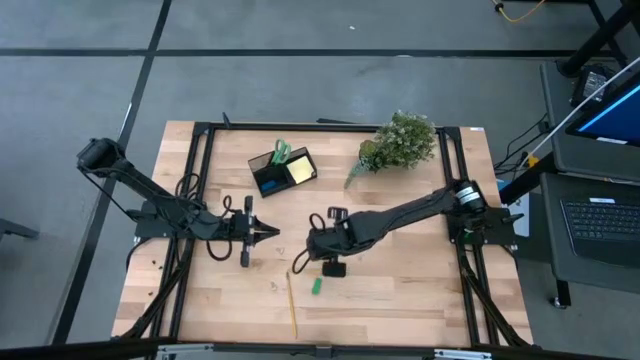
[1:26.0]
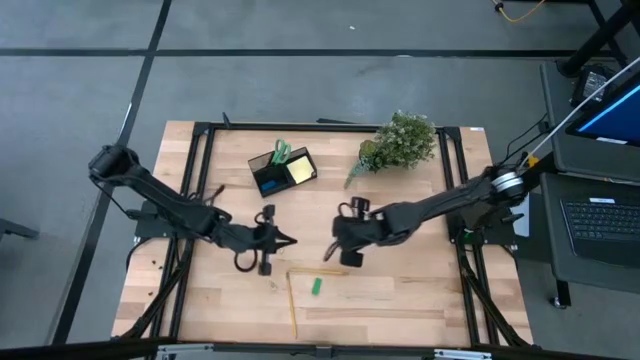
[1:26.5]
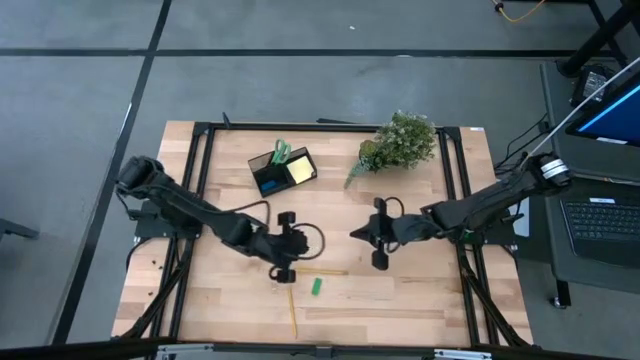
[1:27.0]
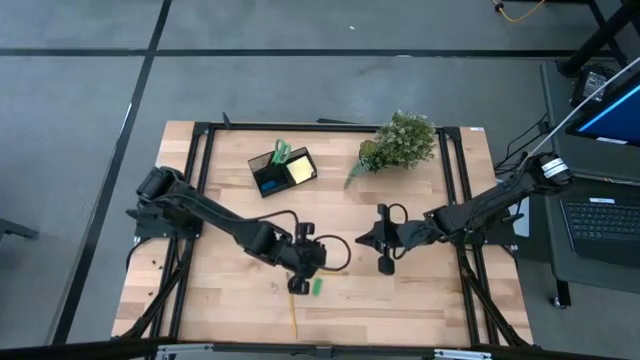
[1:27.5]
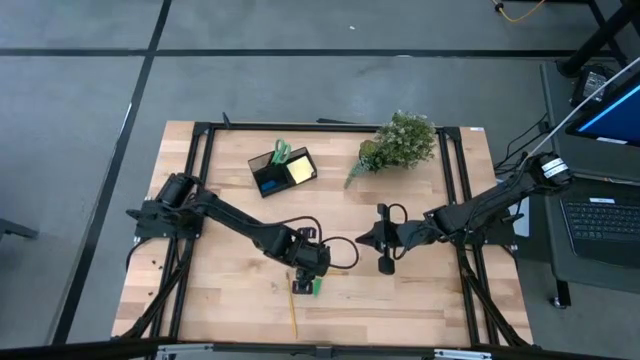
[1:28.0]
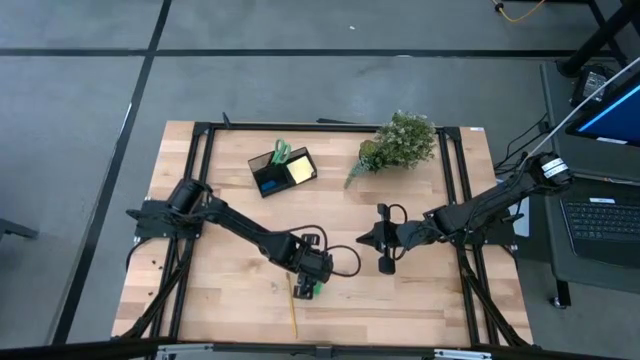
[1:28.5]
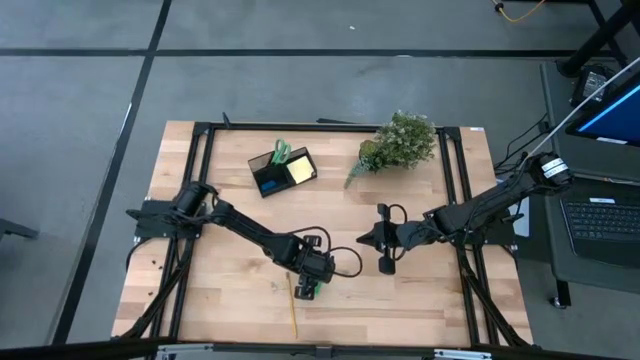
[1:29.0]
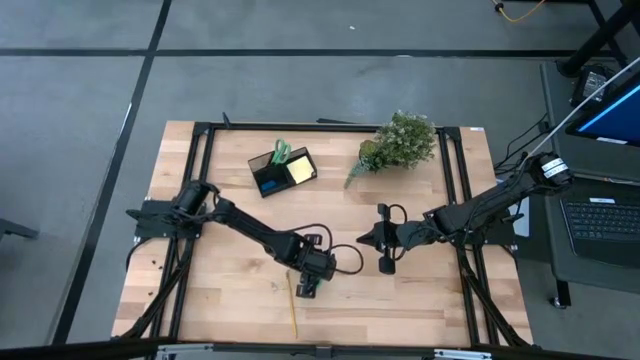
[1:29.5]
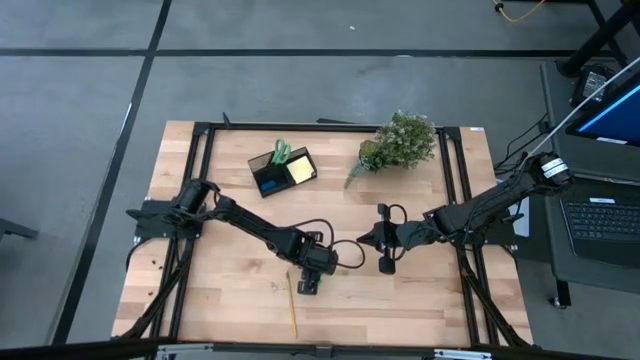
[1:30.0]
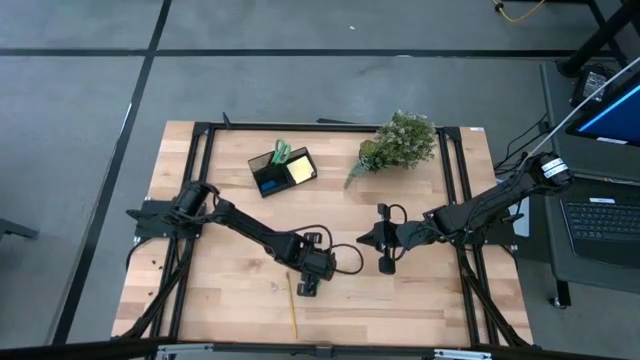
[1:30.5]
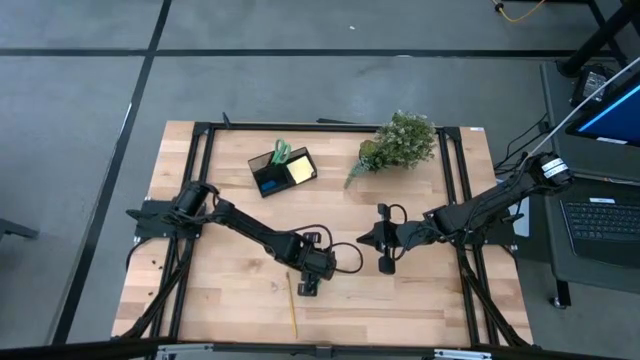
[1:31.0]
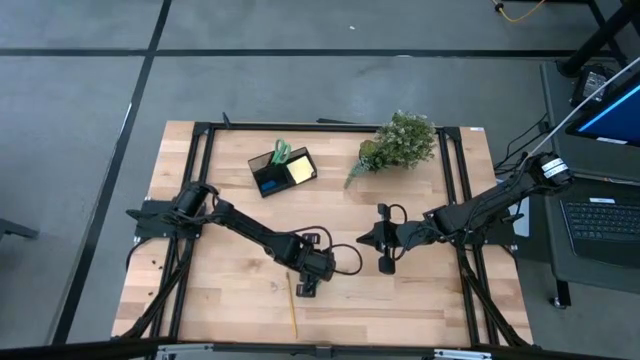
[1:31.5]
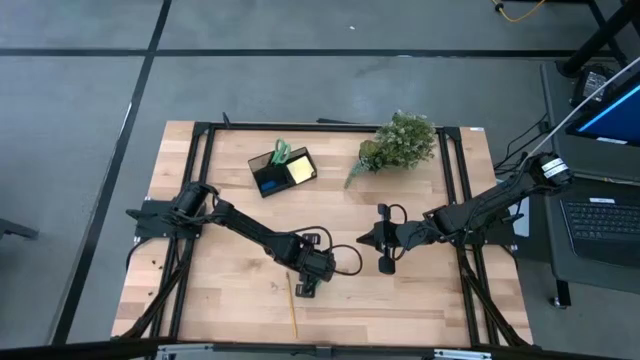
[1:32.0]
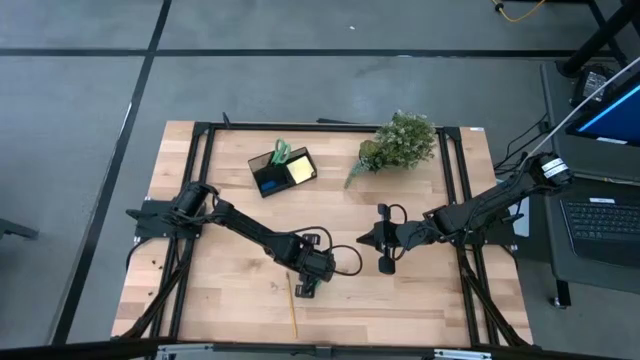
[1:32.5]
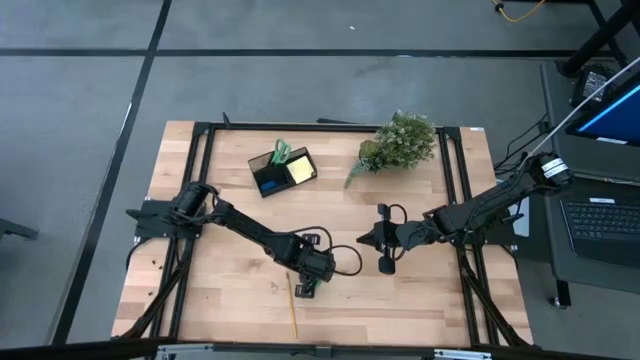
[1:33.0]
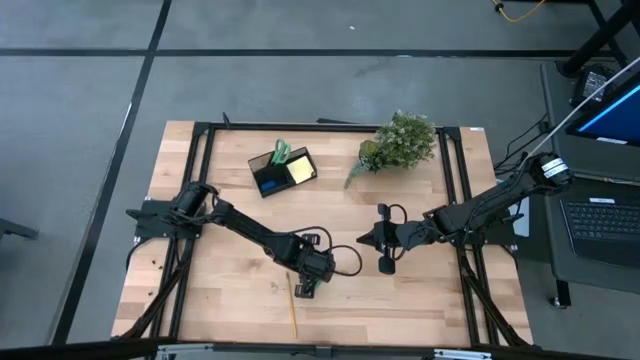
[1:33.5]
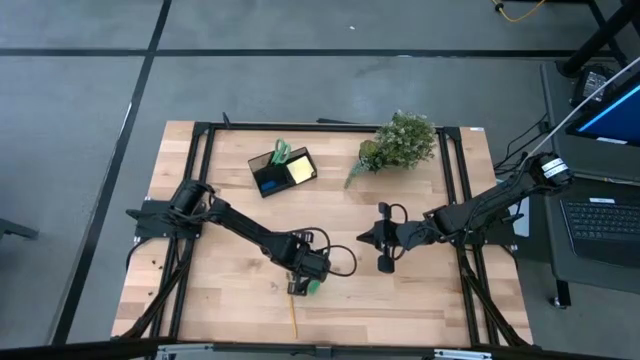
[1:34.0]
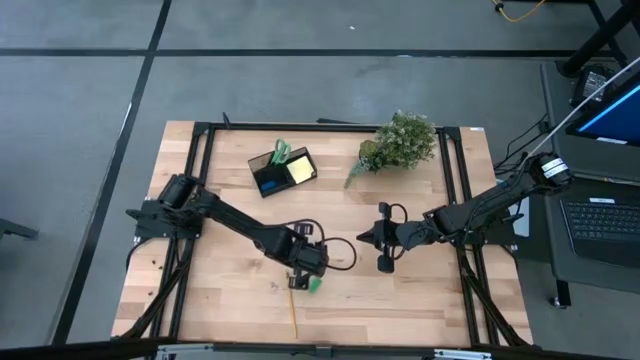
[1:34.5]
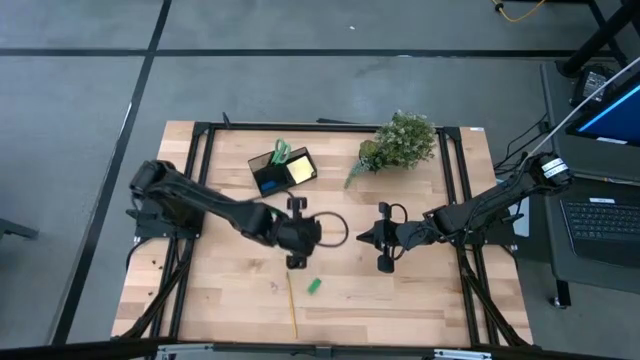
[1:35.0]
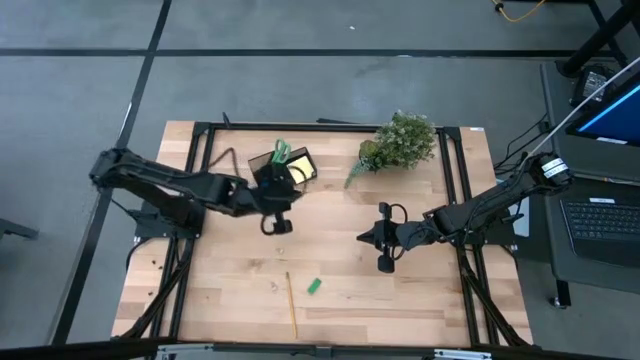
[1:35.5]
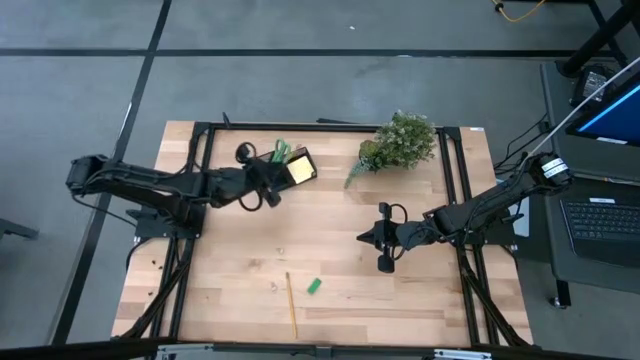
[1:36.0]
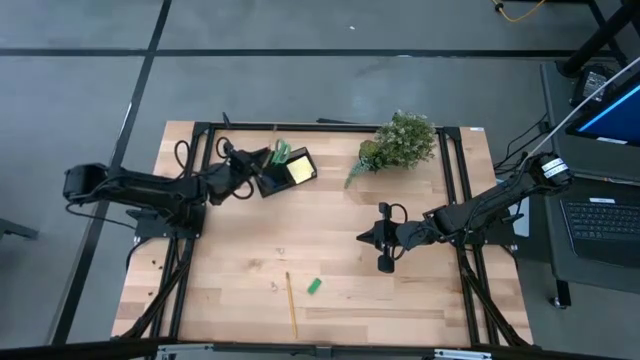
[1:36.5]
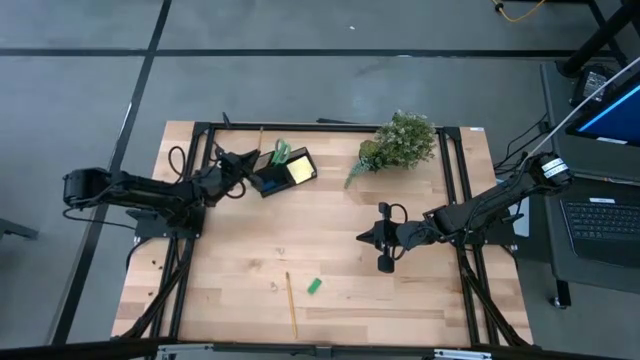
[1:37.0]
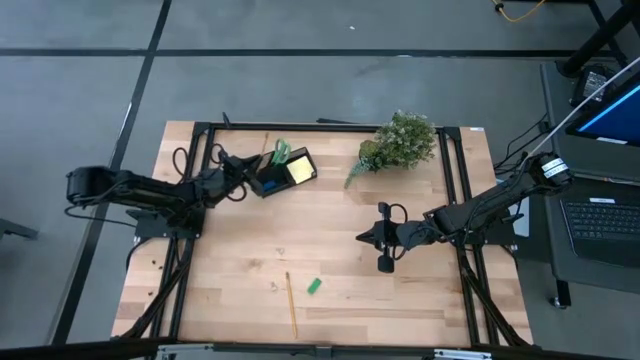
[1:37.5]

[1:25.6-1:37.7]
Task: Pick and place office supplies into organizer
Put the top yellow pencil into the desk organizer

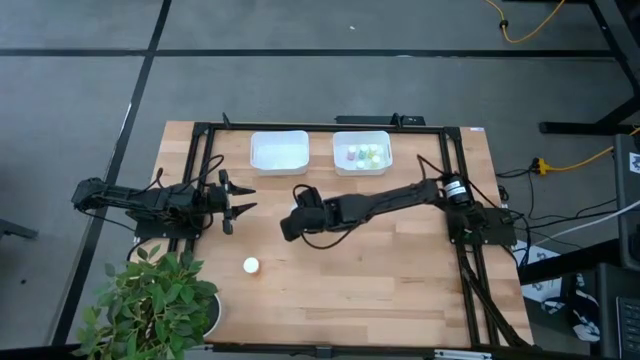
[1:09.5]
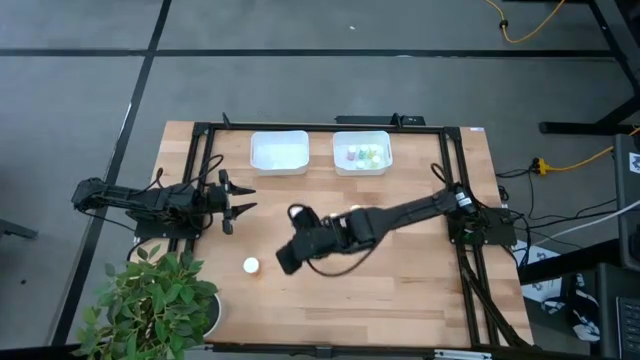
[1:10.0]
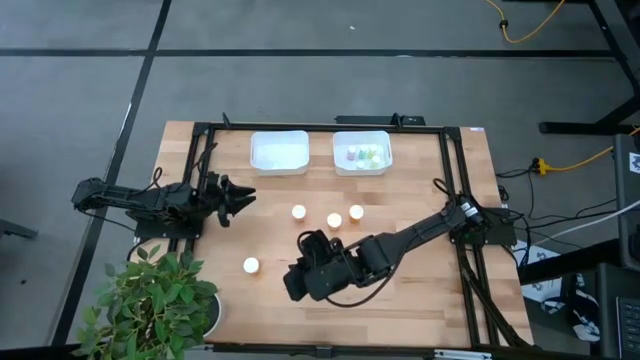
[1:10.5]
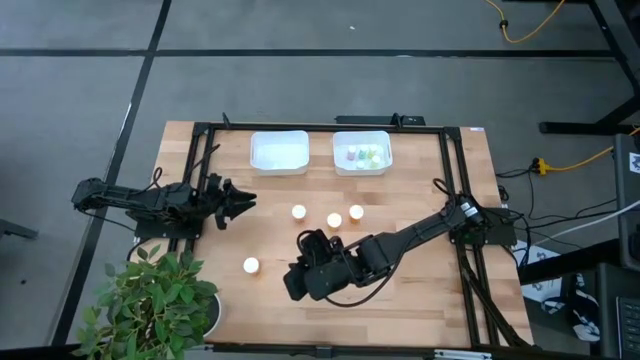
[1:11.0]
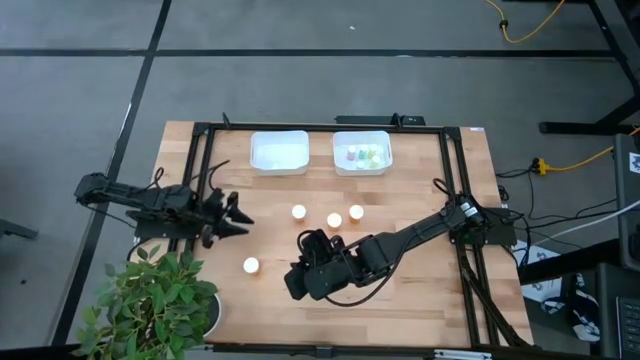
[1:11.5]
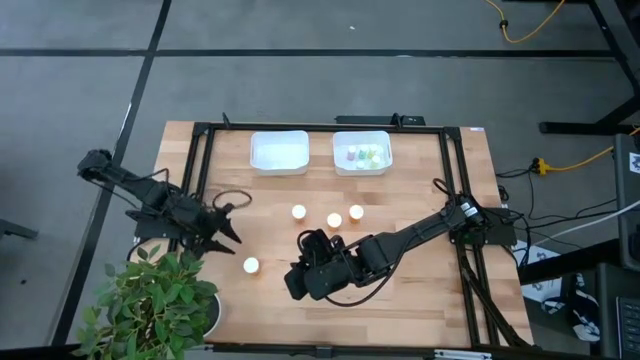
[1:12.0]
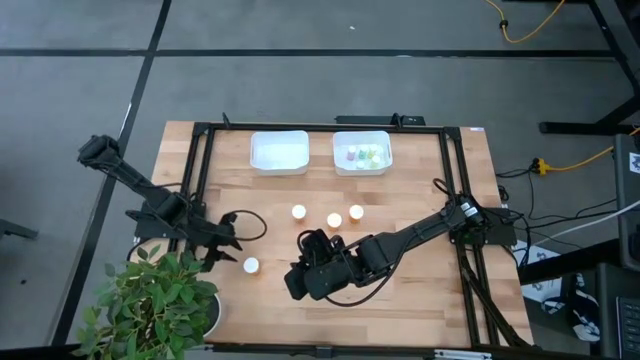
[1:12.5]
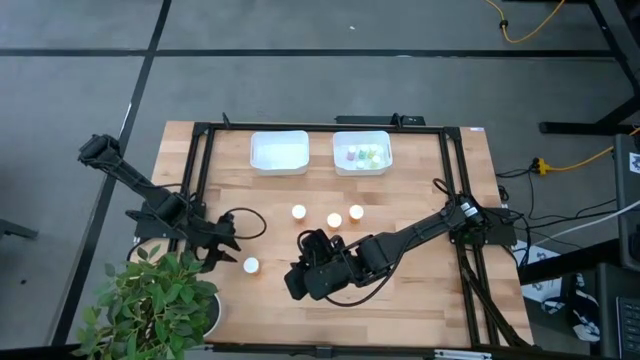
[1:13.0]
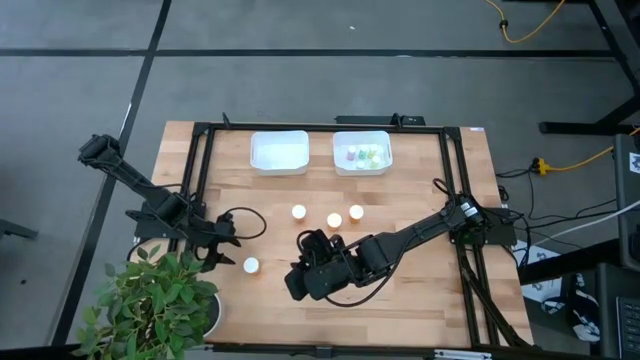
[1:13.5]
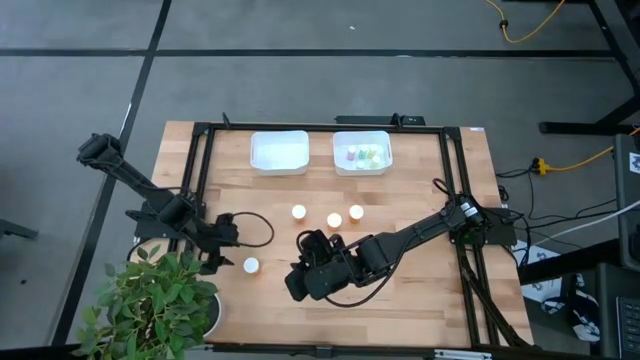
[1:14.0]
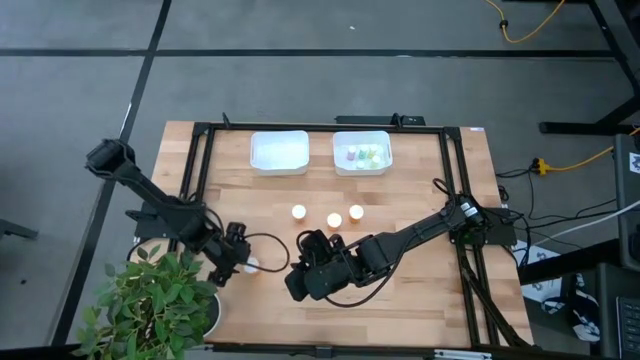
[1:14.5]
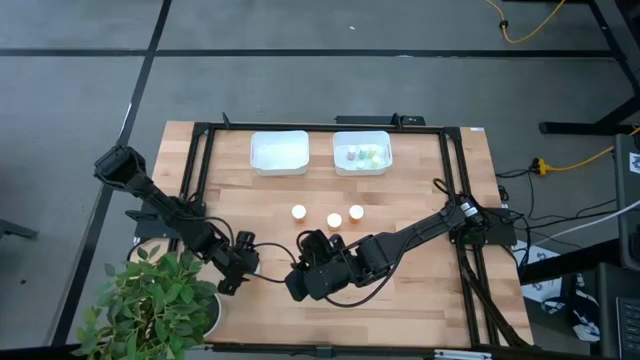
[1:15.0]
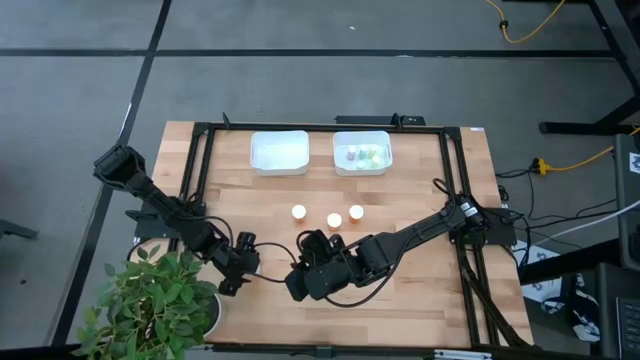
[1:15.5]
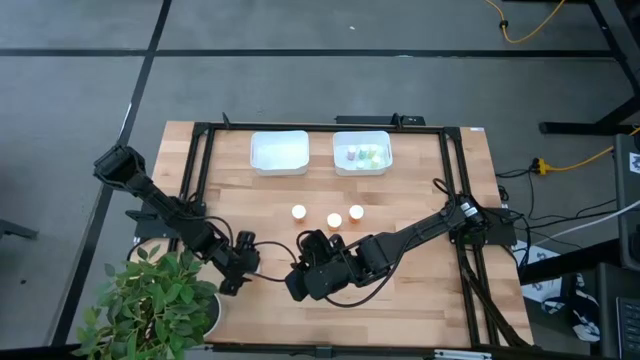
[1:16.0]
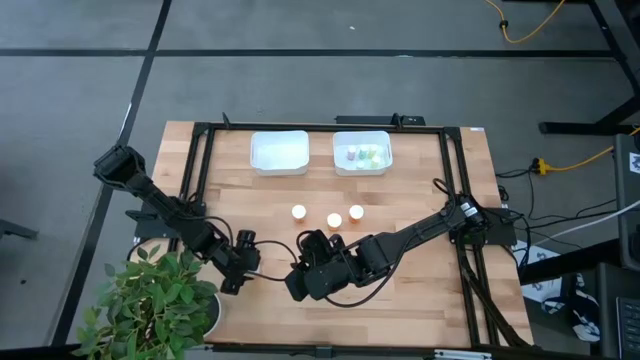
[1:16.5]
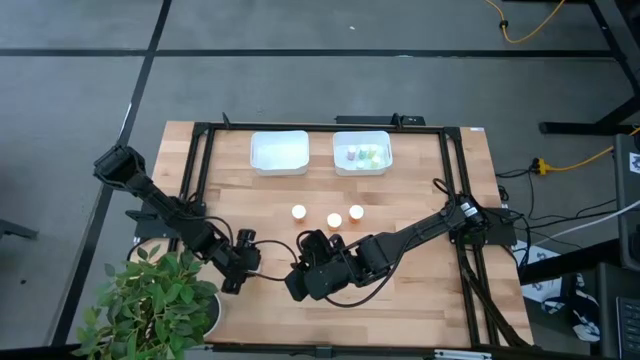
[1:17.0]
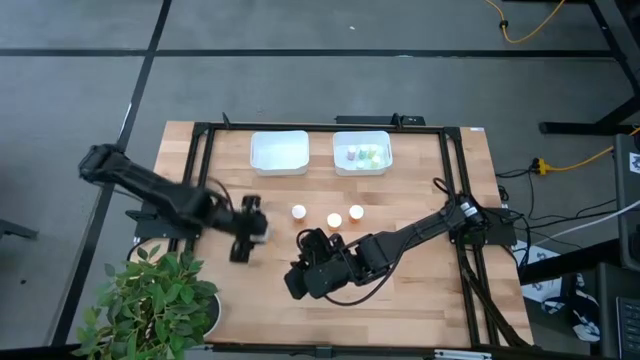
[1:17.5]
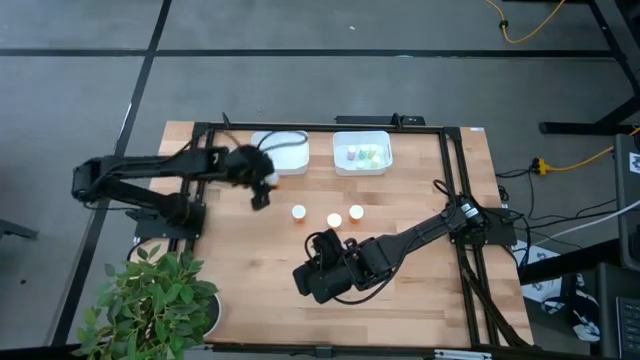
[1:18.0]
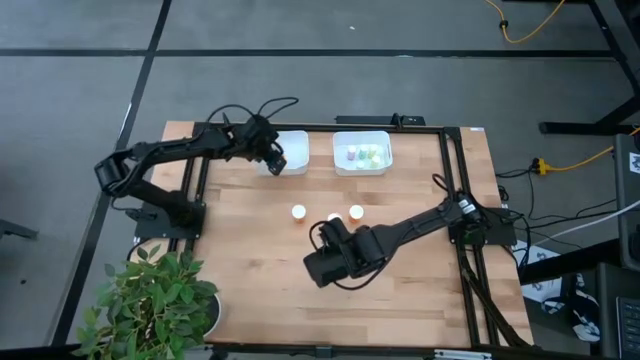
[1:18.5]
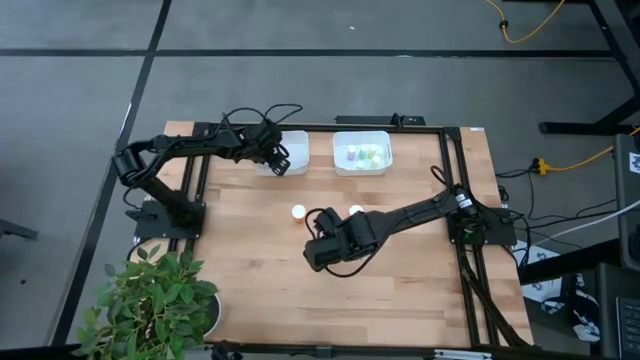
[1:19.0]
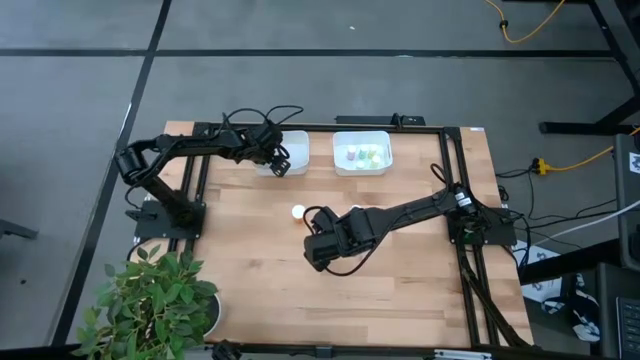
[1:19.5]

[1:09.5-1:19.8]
Task: Pick and place medicine bottles into bin by pill shape (circle, oval)
Put the orange pill bottle into the left white bin
